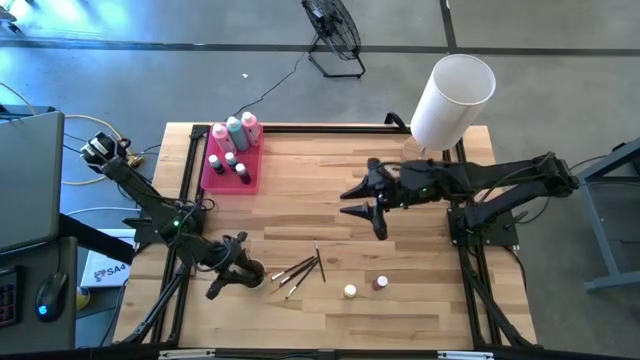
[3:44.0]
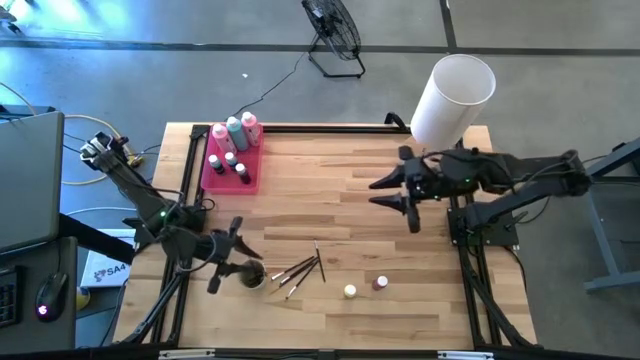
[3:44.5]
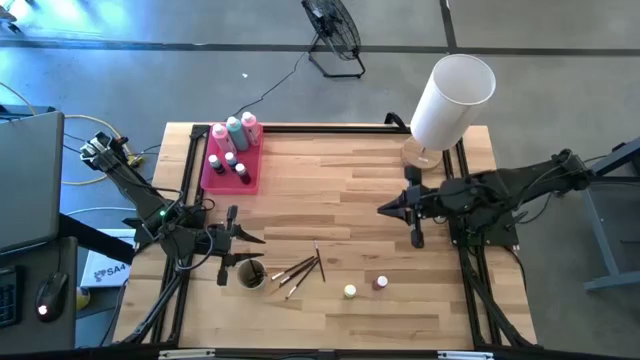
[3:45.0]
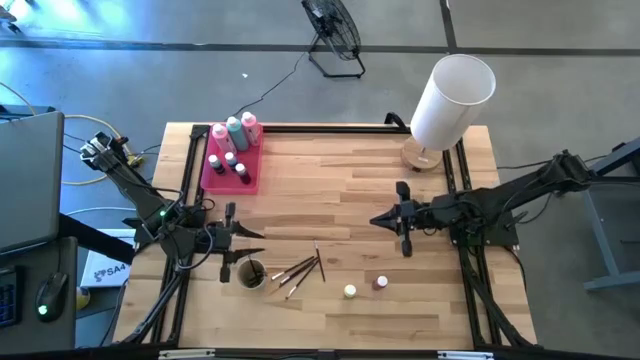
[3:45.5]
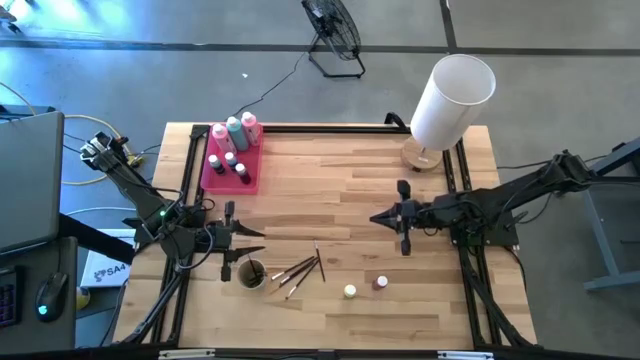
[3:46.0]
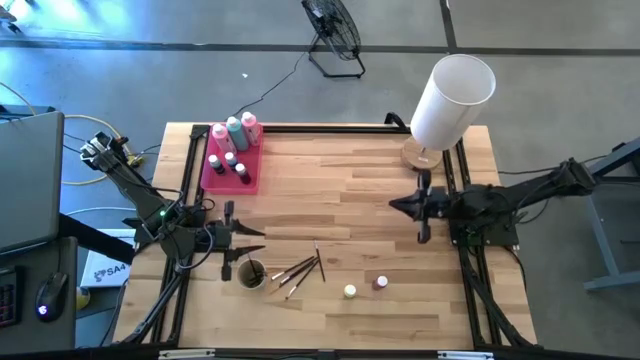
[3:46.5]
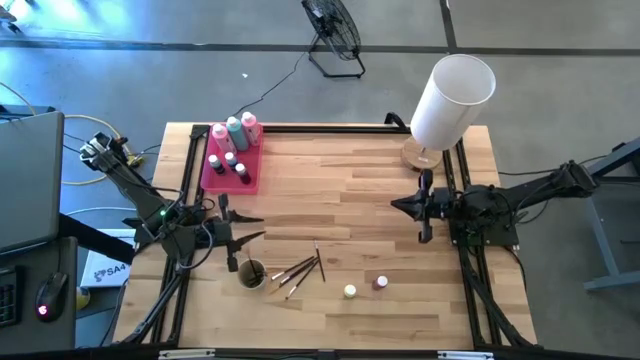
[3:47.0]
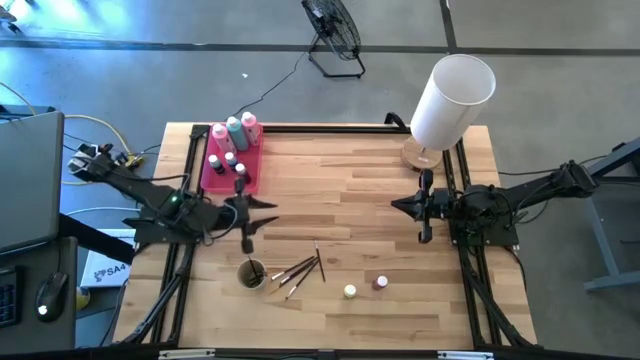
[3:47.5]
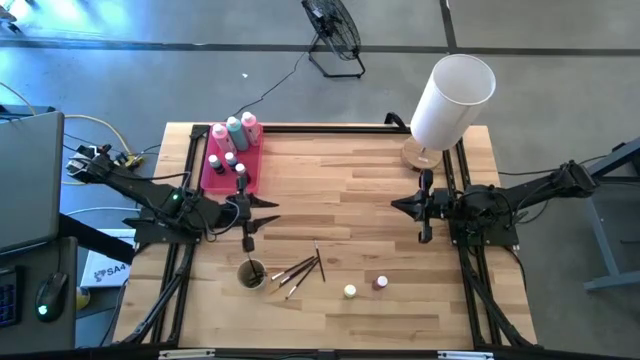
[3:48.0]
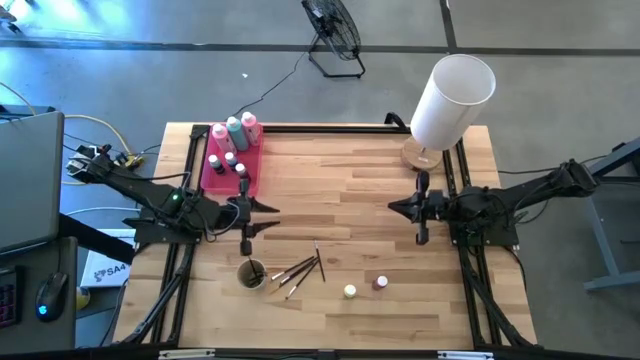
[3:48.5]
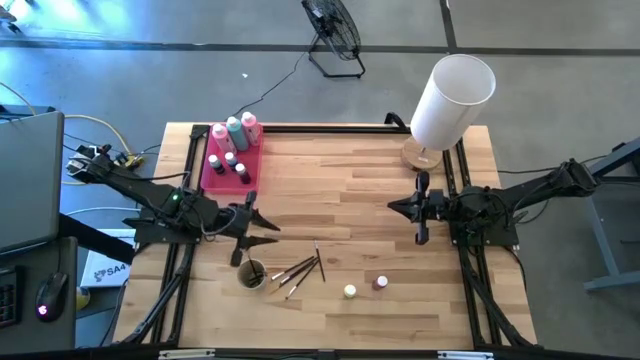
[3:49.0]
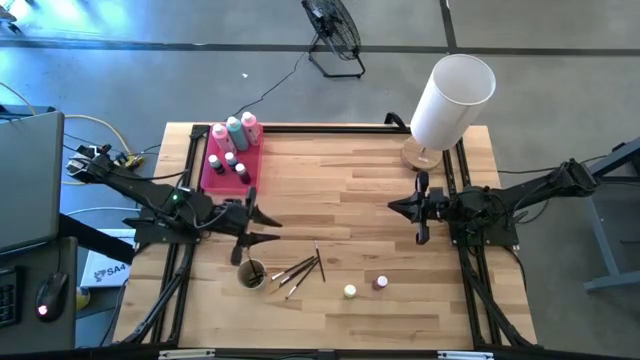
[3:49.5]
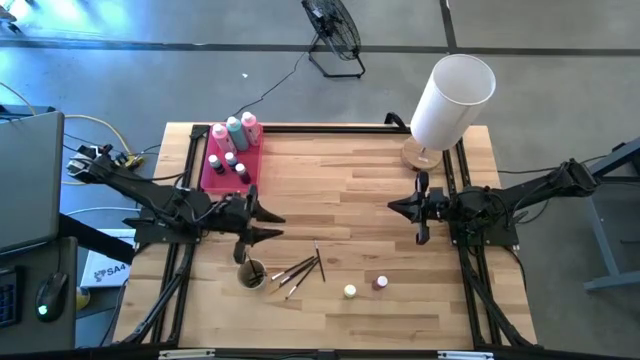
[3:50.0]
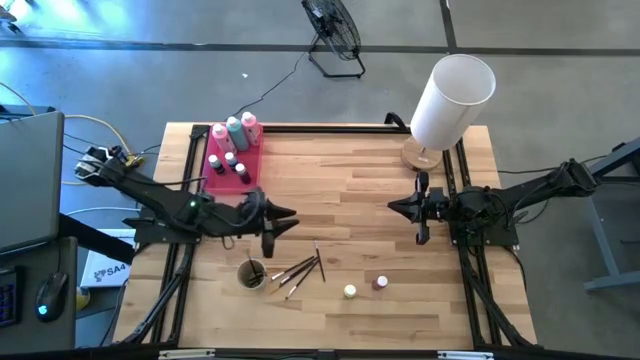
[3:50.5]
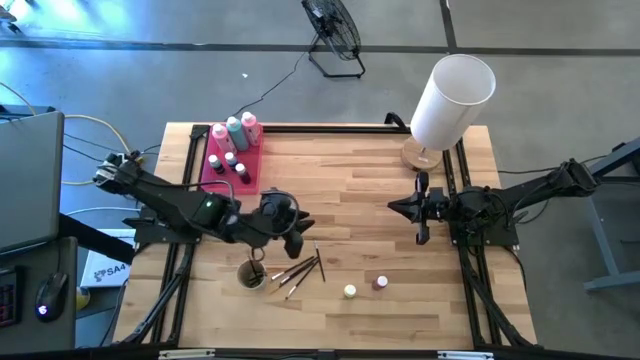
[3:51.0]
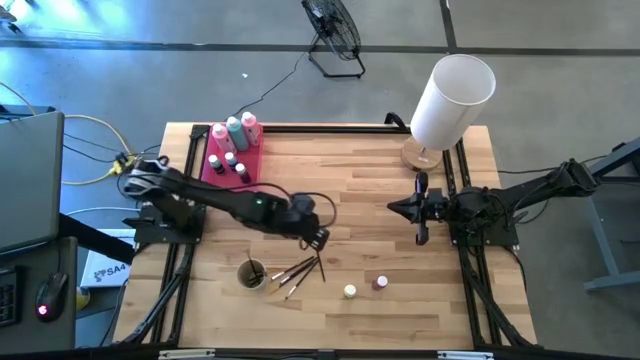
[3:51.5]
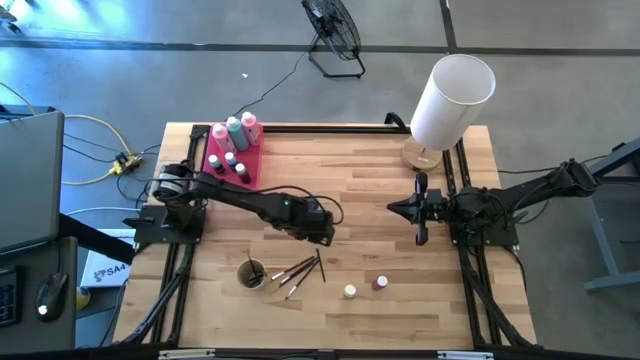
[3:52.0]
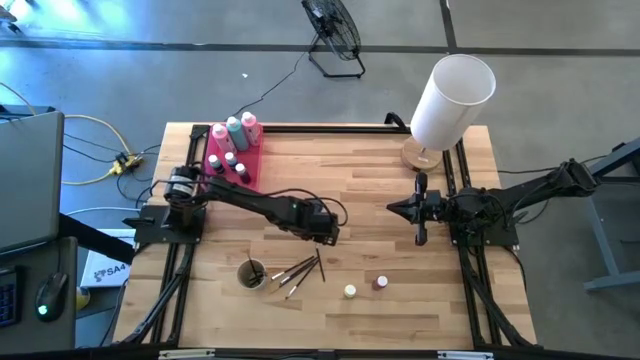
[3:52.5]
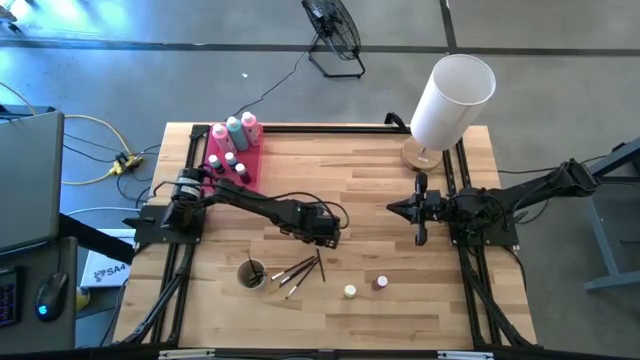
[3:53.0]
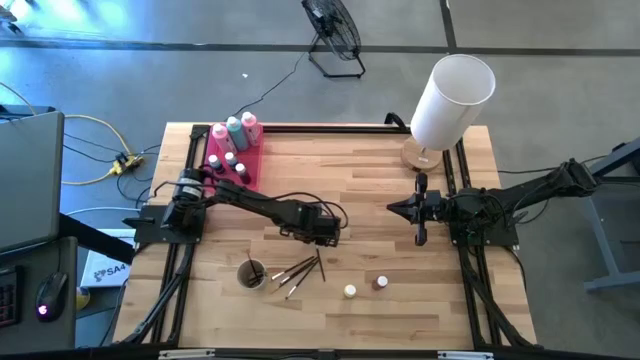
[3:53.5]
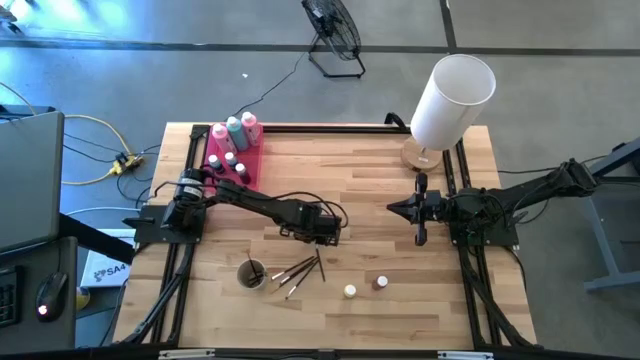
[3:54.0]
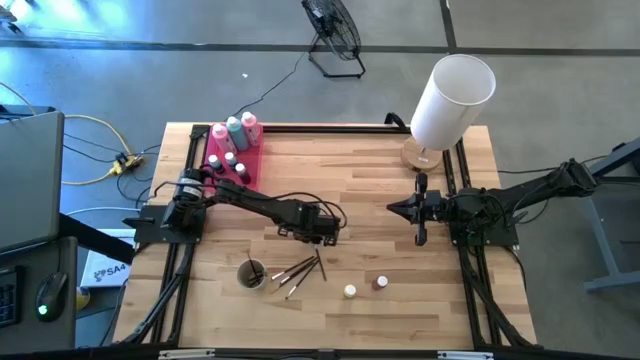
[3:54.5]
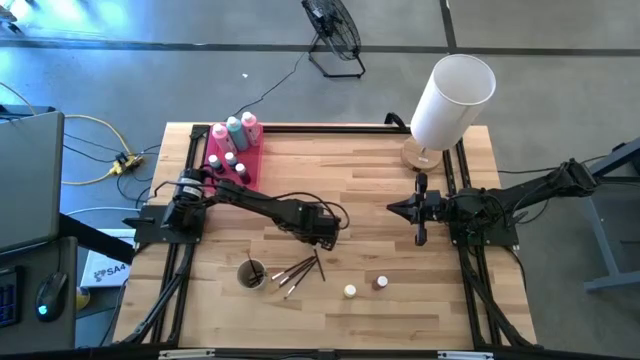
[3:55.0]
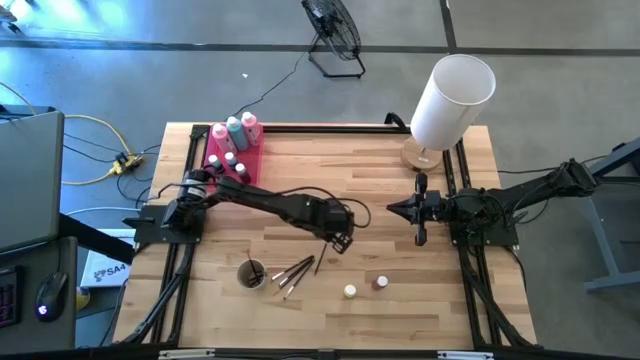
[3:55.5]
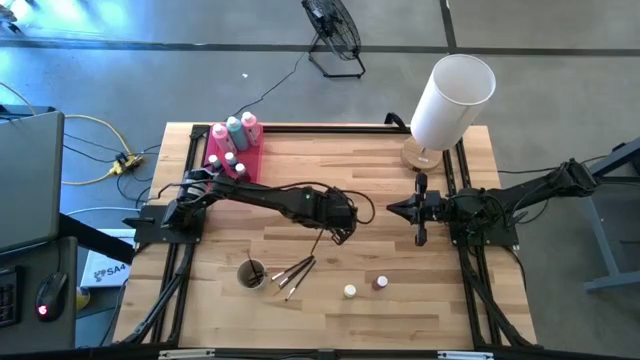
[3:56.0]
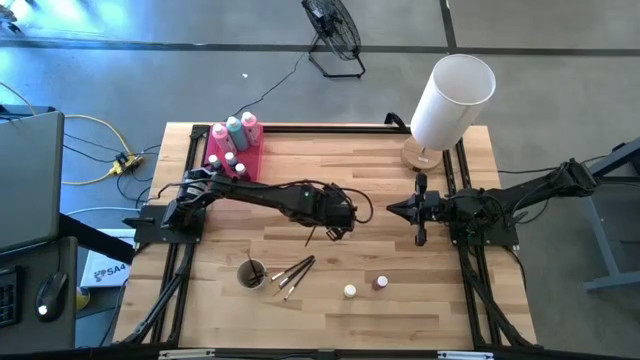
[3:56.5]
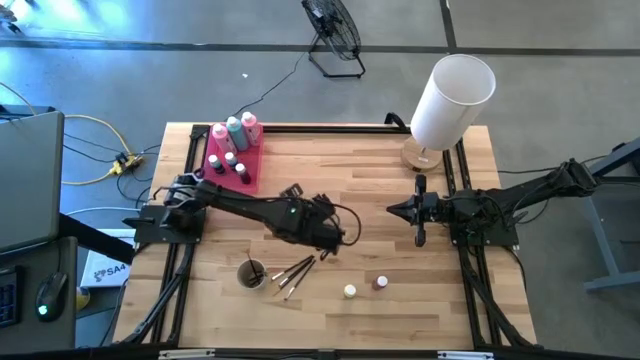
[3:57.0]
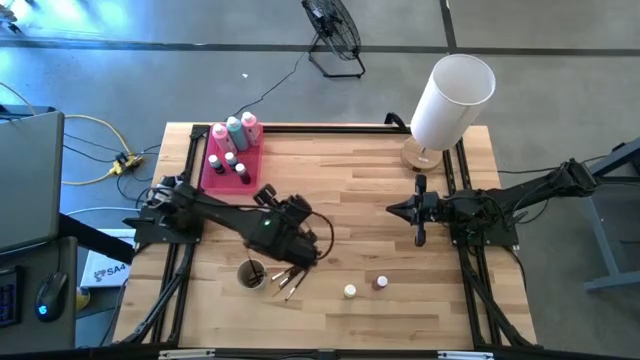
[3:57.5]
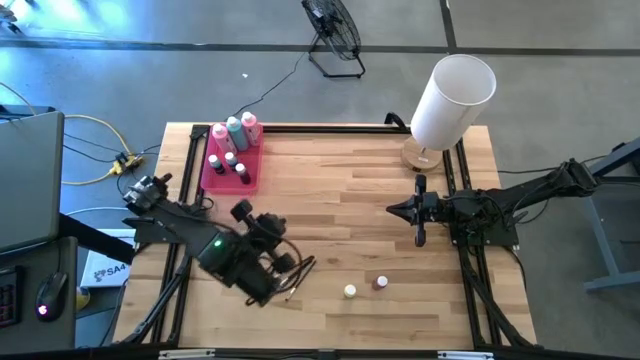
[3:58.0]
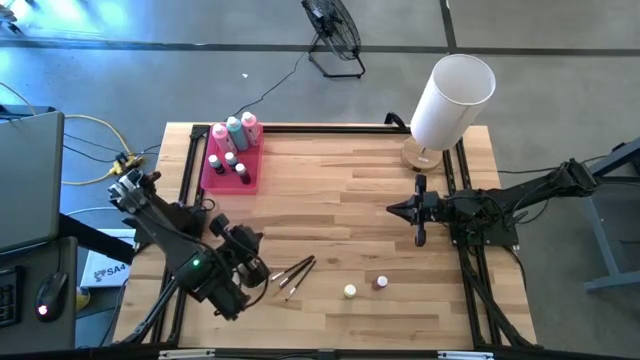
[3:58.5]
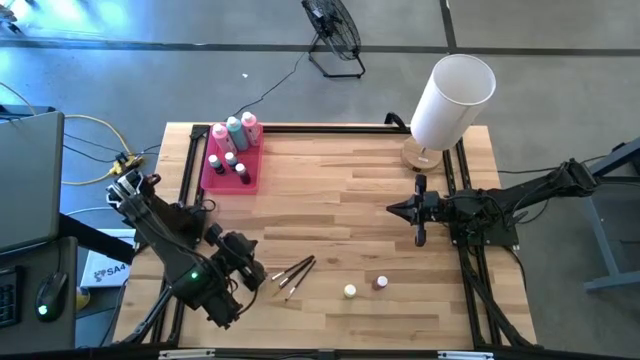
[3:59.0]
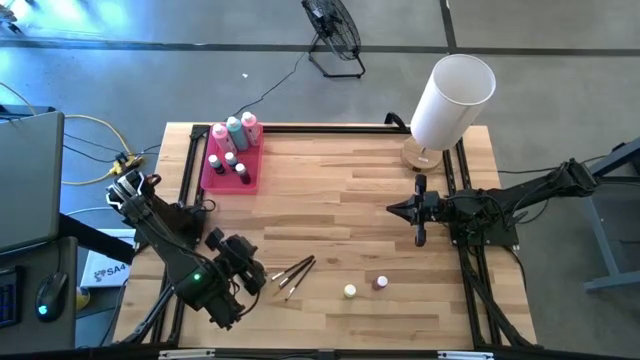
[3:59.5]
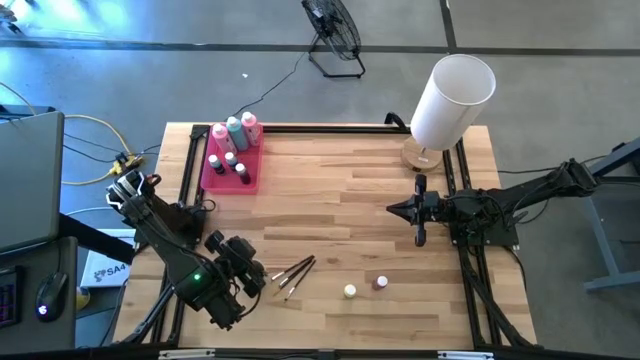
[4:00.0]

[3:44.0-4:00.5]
Task: Pick & Place Paint Supplies
Put the silver paintbrush into the light brown cup

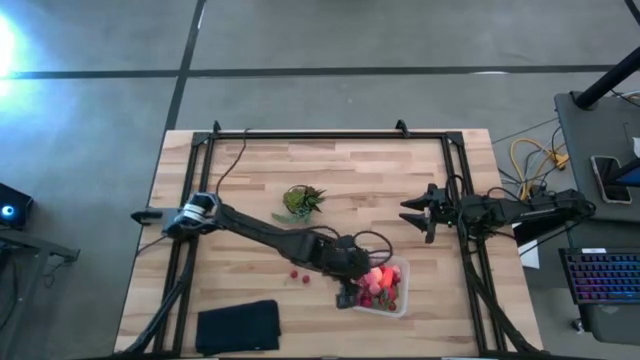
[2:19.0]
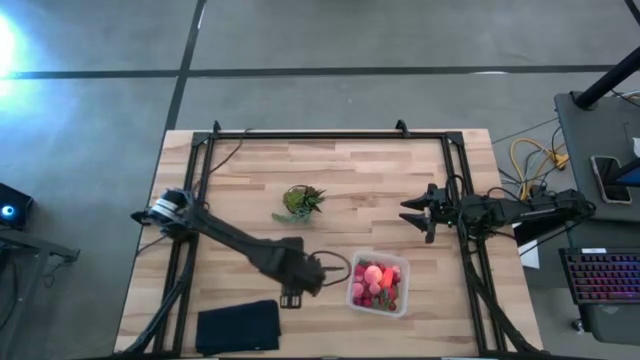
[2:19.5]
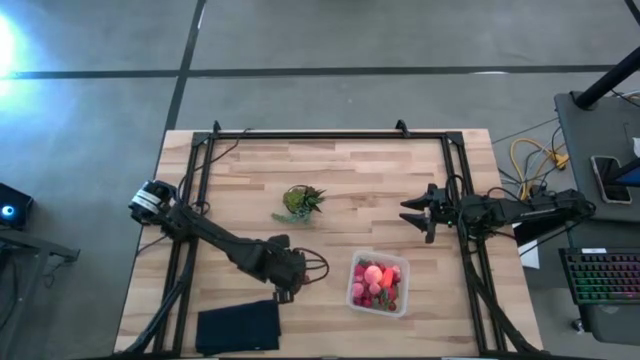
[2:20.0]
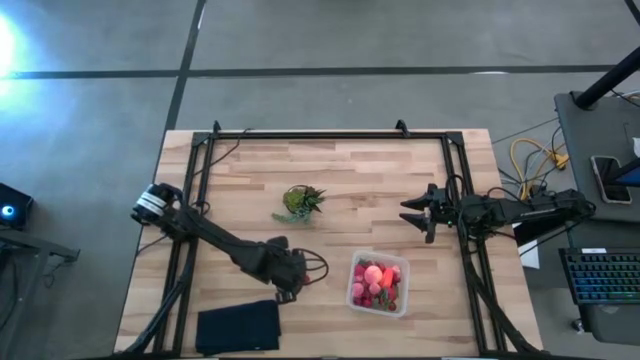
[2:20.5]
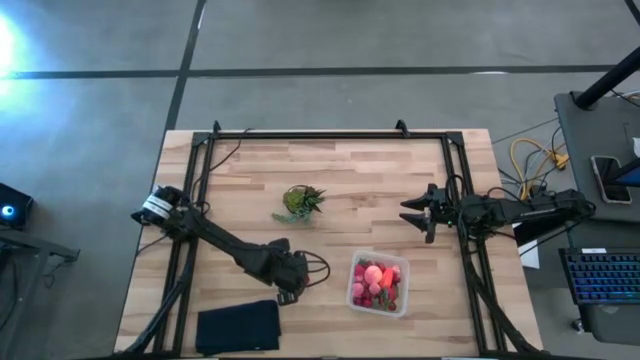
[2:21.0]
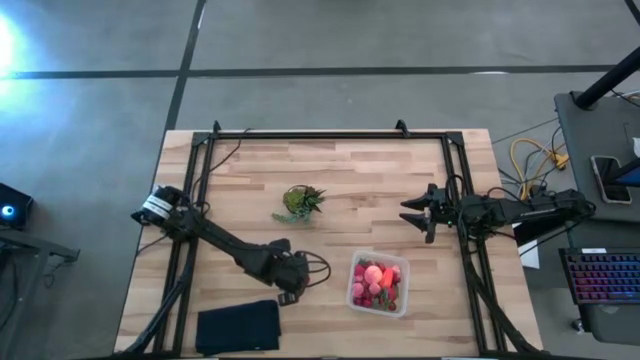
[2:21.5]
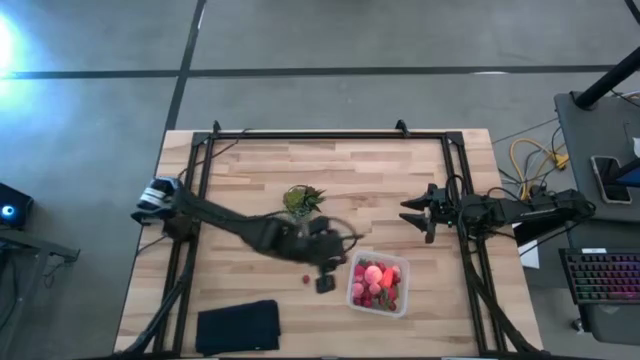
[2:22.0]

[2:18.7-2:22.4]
Task: Pick and placing Produce into tupperware
Put the left cherry into the bin
